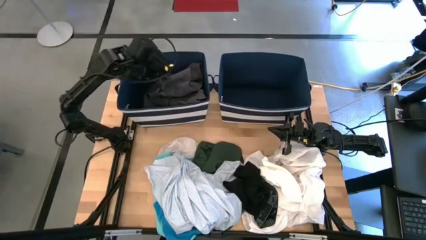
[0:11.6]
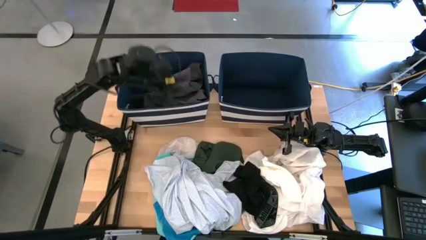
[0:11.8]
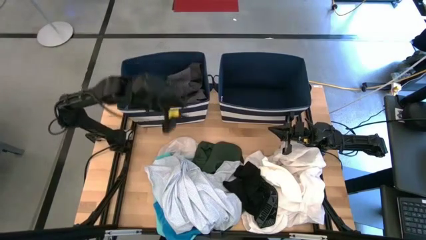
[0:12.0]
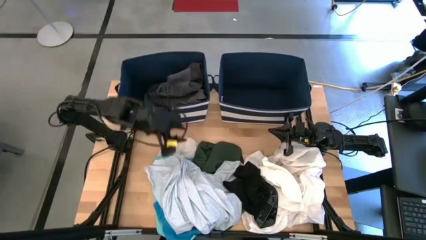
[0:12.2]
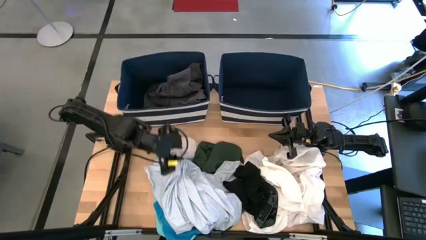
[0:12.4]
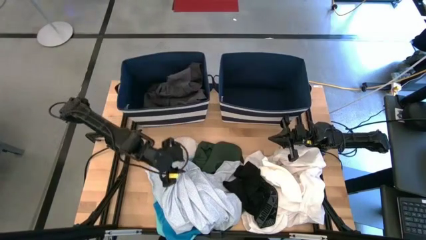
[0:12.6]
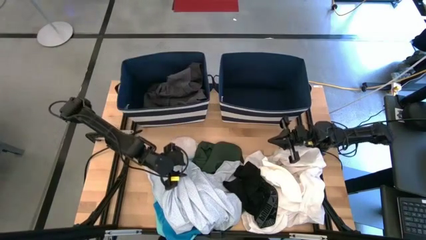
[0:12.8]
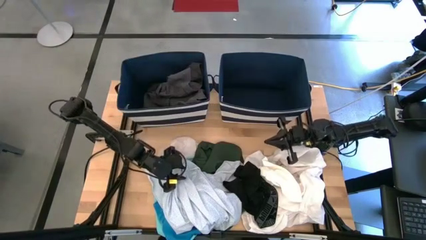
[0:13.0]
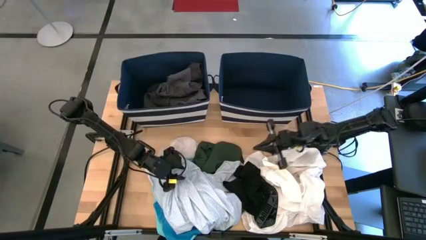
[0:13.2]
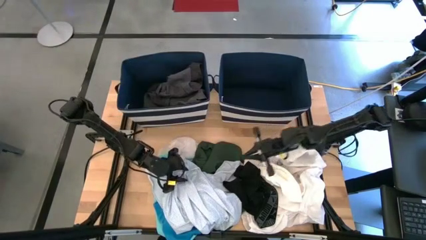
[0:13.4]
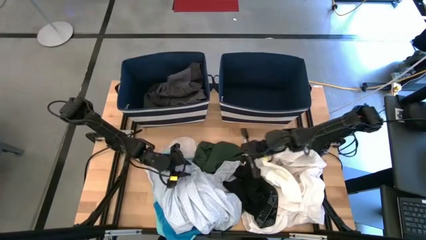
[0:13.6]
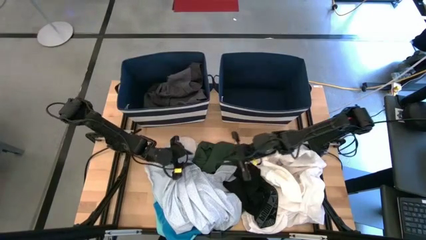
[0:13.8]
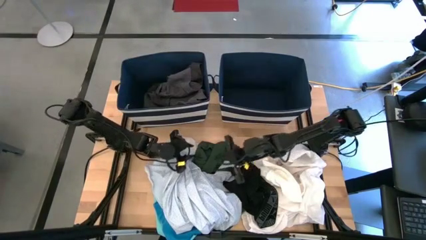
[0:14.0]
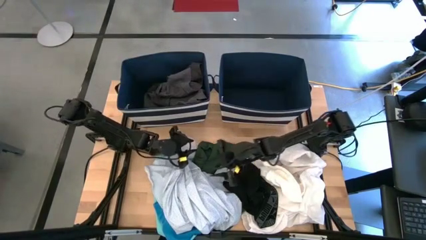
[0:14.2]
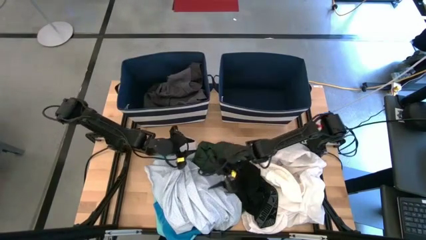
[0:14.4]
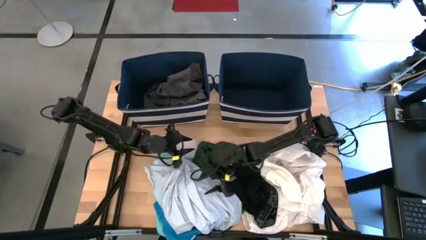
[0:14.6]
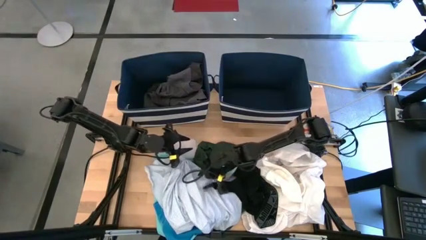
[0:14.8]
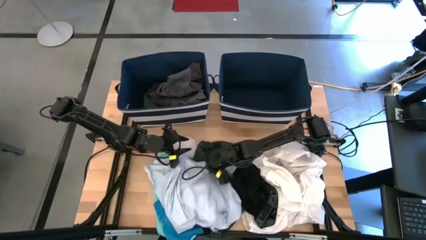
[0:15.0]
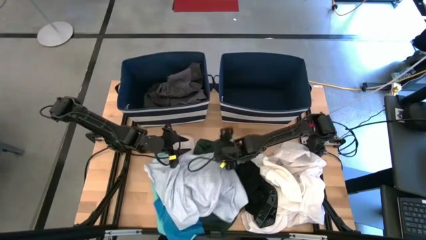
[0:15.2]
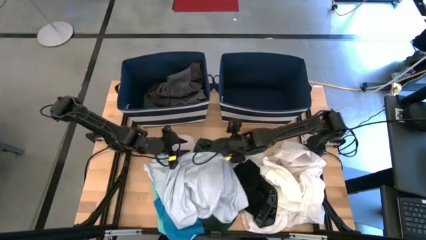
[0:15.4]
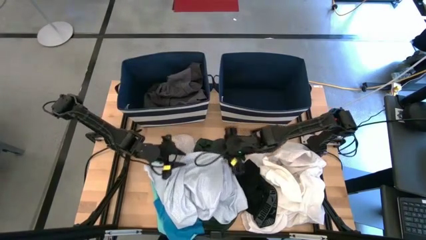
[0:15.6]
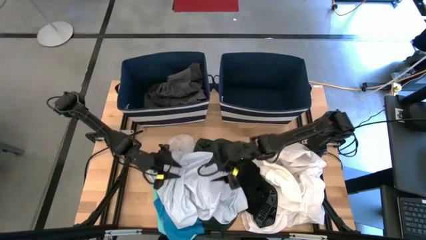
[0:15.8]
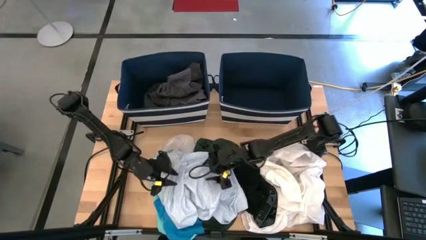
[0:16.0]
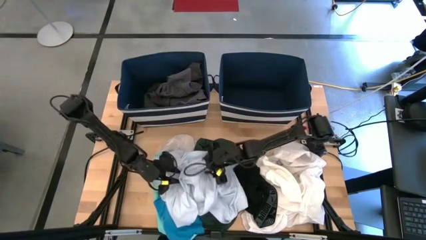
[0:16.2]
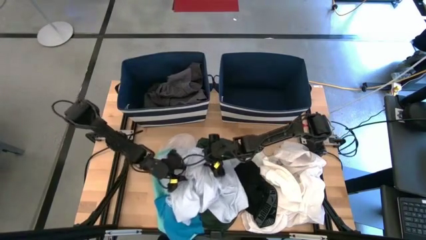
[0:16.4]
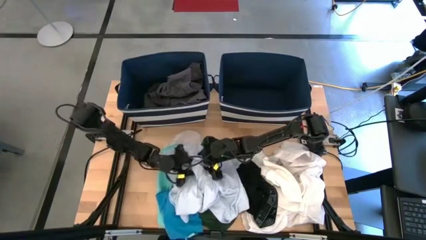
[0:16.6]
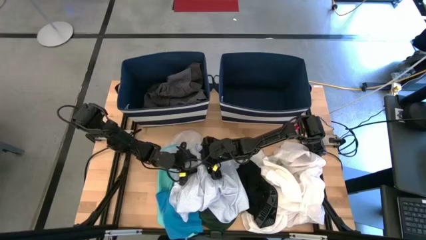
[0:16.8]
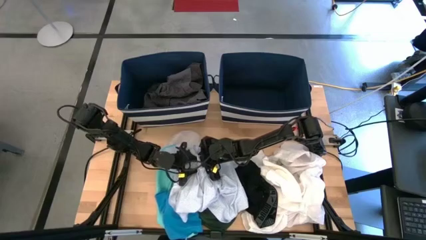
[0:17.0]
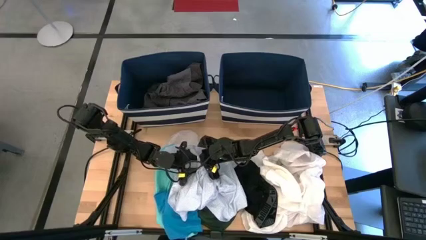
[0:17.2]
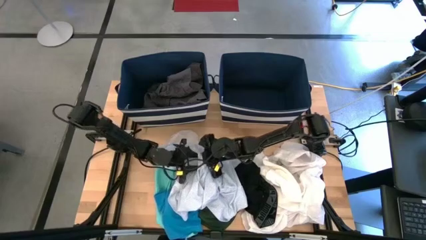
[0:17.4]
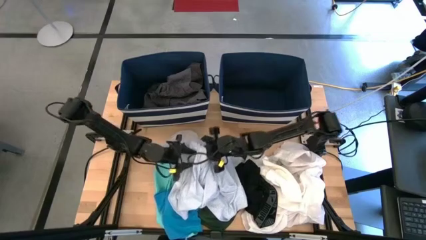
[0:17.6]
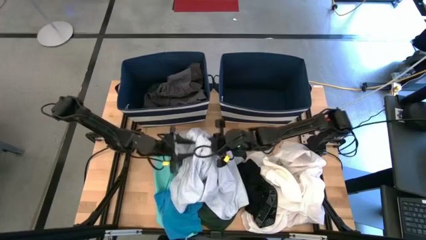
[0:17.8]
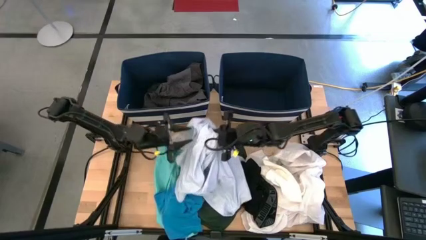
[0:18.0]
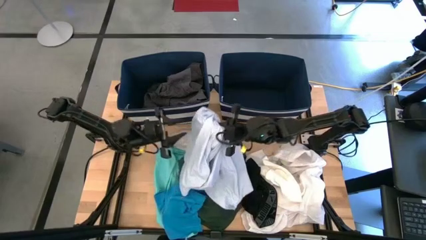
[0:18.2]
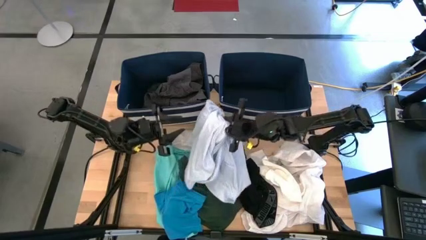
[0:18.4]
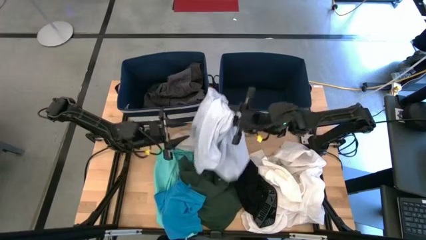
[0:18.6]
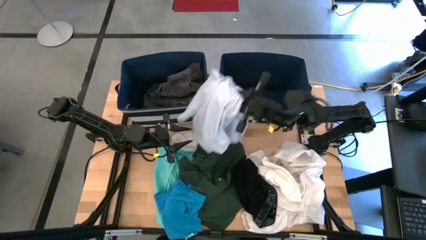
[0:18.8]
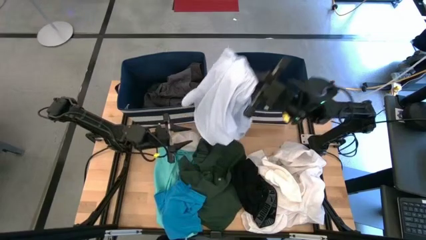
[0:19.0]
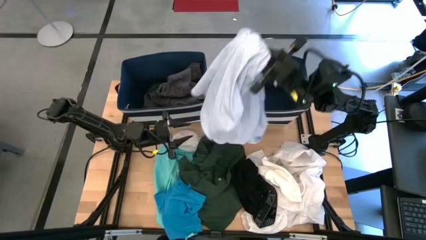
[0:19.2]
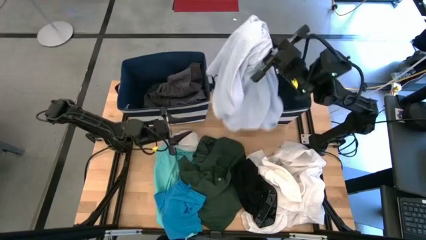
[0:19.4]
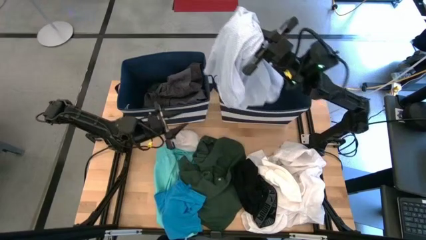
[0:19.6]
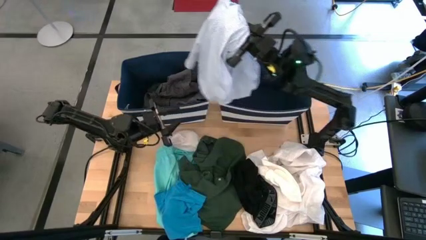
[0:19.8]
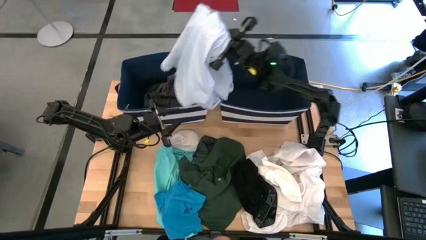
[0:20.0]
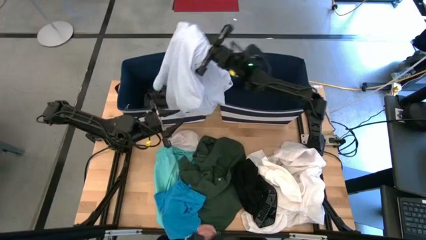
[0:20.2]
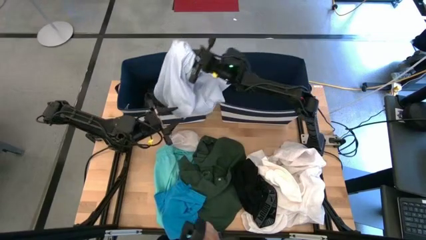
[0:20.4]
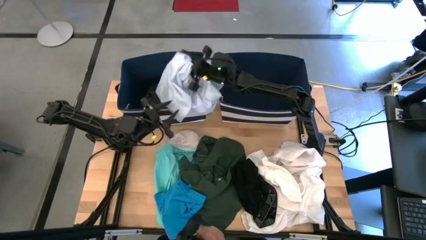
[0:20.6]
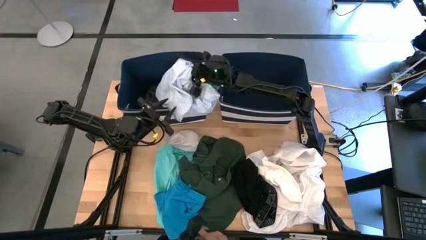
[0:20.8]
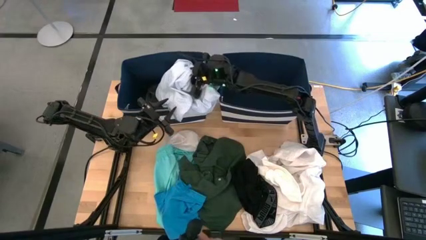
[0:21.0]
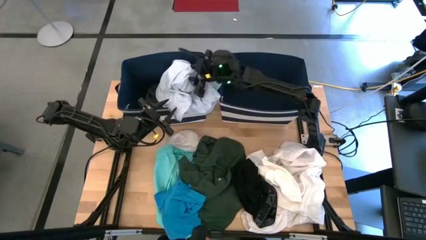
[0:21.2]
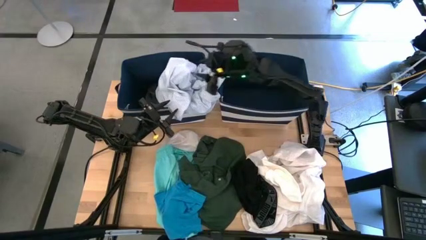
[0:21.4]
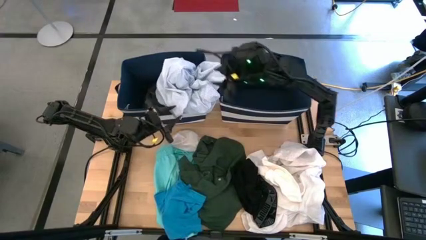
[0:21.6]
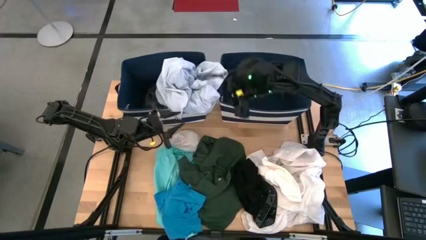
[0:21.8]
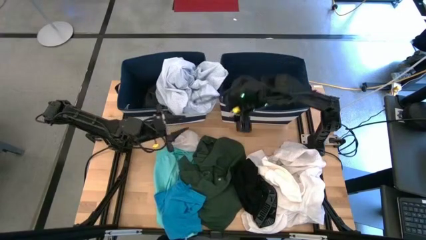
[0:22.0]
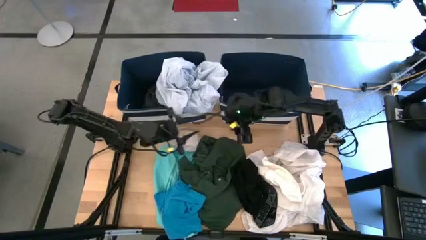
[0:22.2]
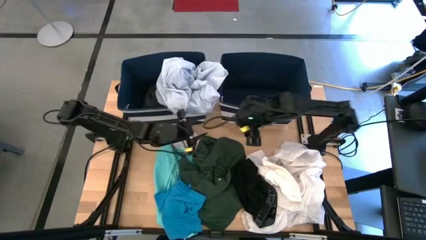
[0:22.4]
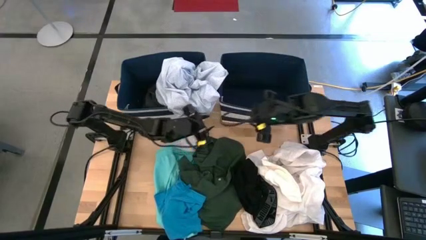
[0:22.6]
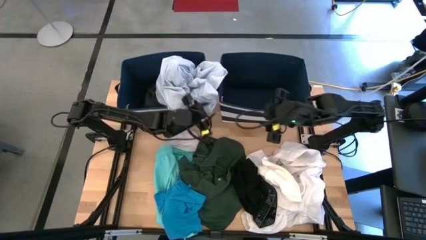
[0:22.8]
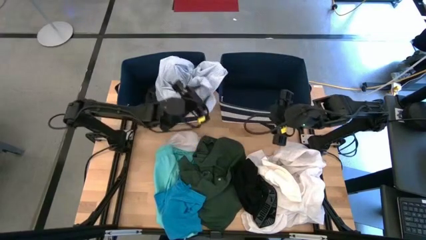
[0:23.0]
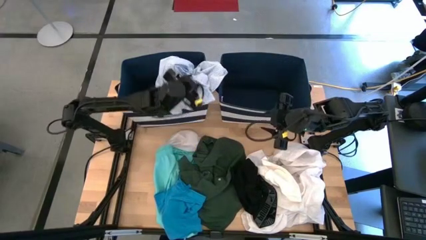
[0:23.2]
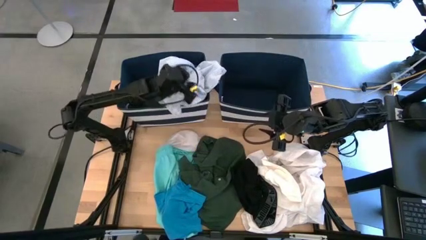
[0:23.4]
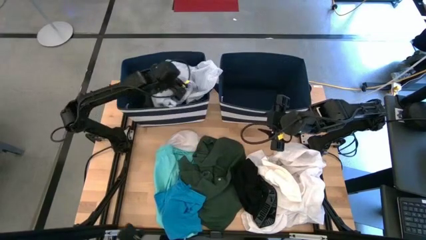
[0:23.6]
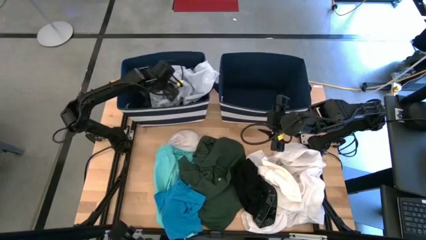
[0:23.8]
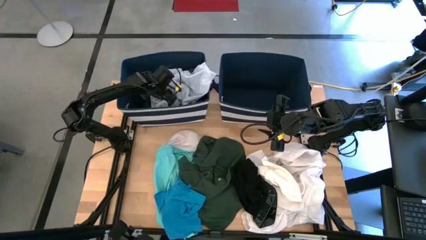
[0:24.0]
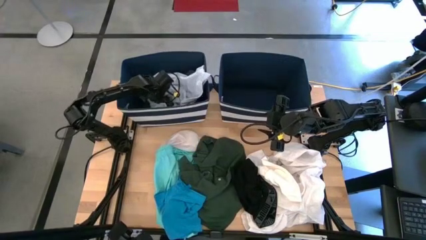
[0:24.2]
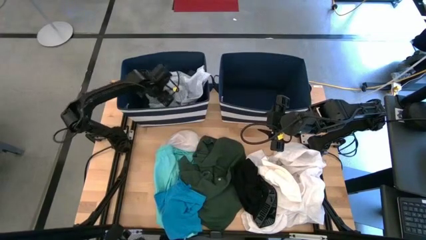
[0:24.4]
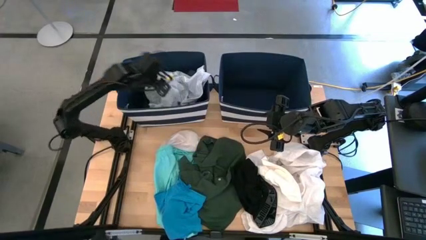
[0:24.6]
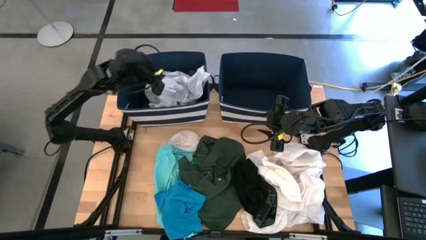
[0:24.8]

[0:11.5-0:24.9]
Task: Sort clothes
Put the white patient gown into the left blue bin

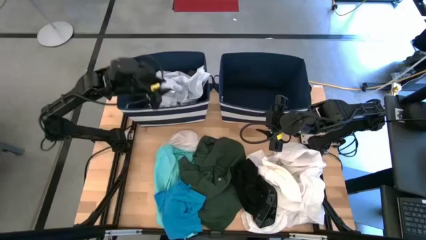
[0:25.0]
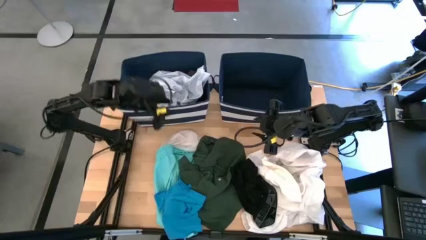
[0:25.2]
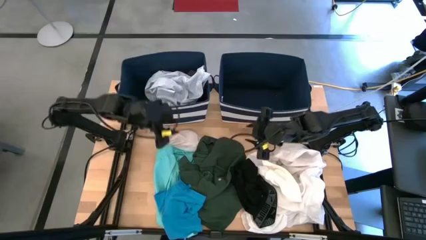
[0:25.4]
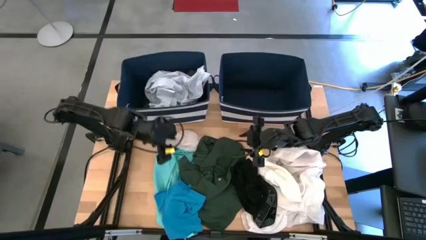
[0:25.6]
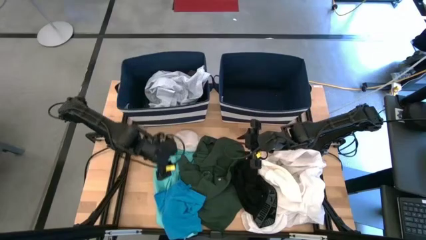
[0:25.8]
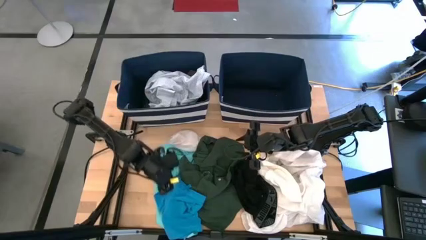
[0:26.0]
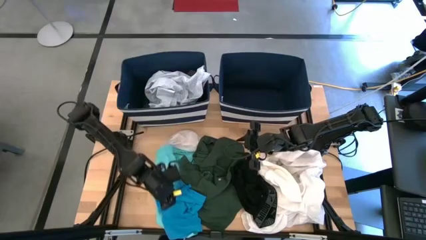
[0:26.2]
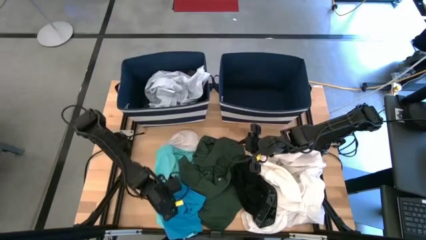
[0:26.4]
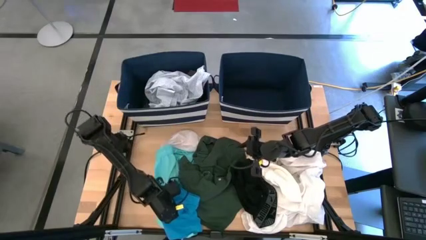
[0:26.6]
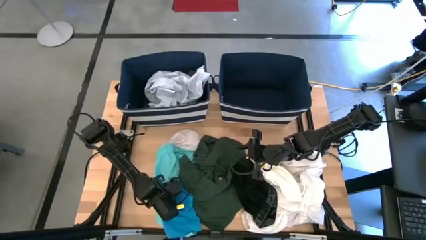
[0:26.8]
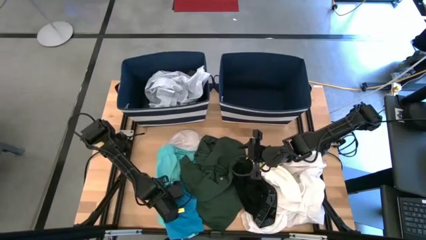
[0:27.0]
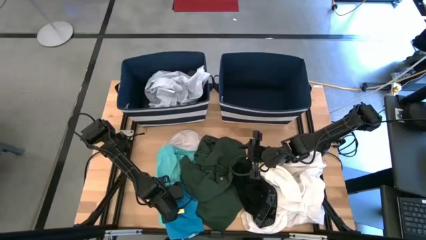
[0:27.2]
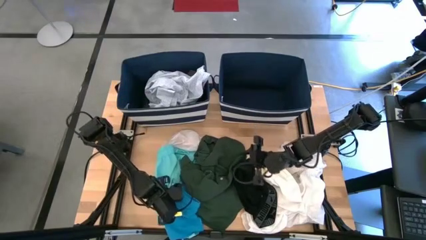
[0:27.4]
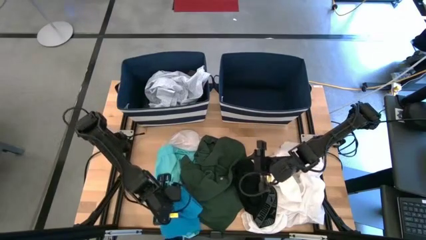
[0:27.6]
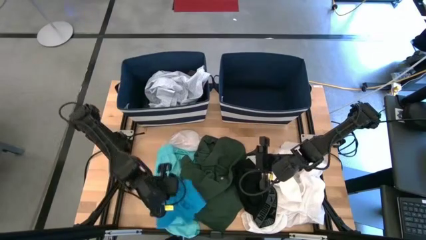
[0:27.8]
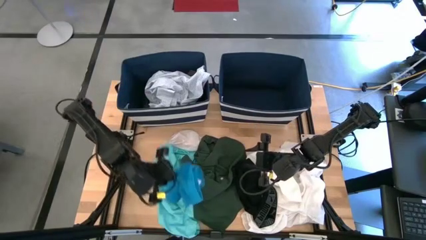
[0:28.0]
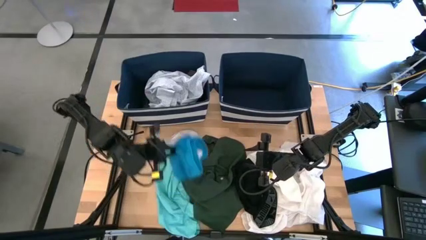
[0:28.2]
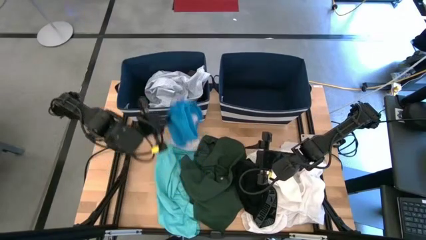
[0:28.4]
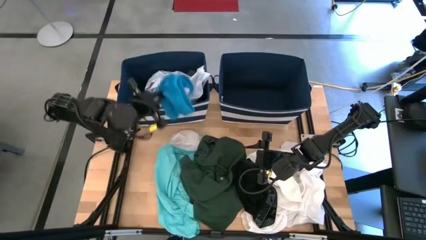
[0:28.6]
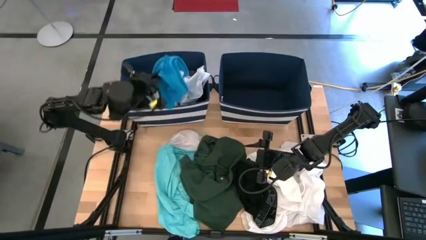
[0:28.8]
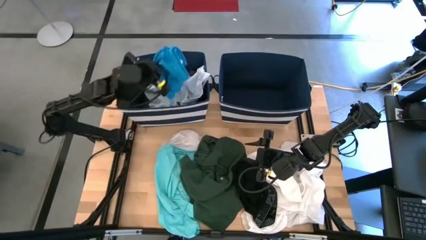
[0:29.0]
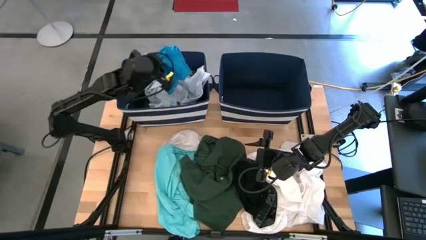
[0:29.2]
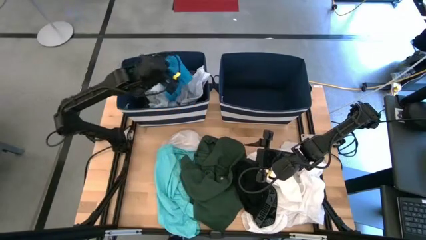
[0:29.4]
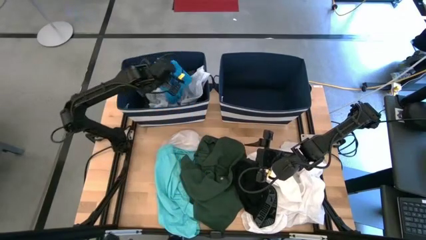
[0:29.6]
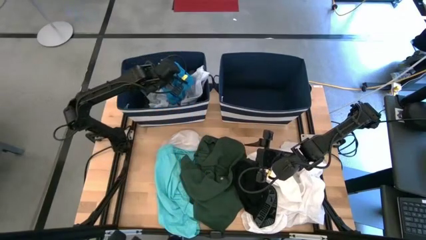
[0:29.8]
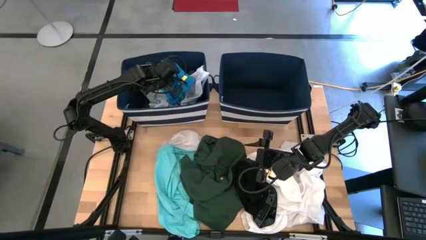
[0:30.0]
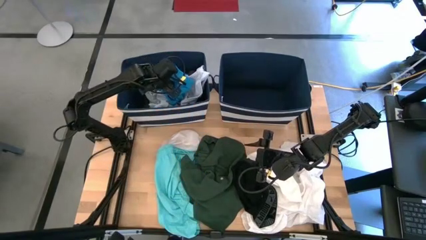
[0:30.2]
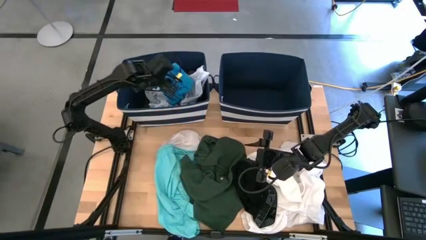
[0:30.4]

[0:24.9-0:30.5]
Put the blue shorts into the left blue bin
